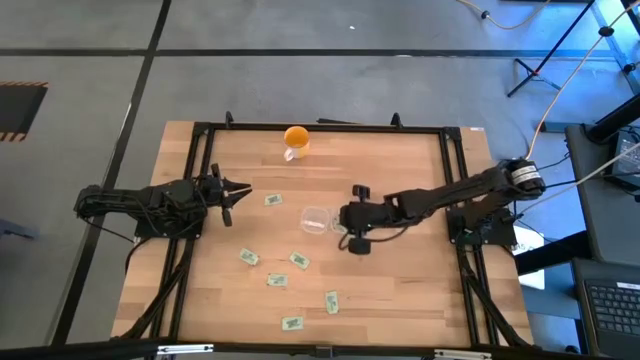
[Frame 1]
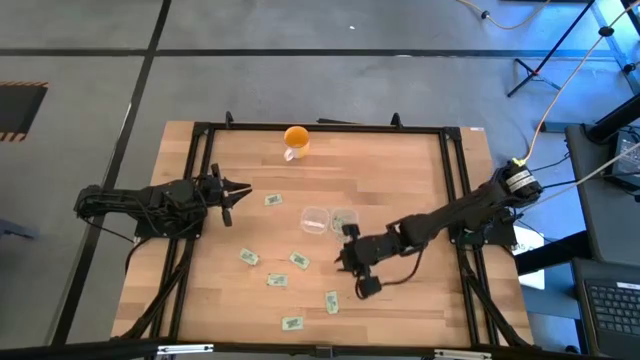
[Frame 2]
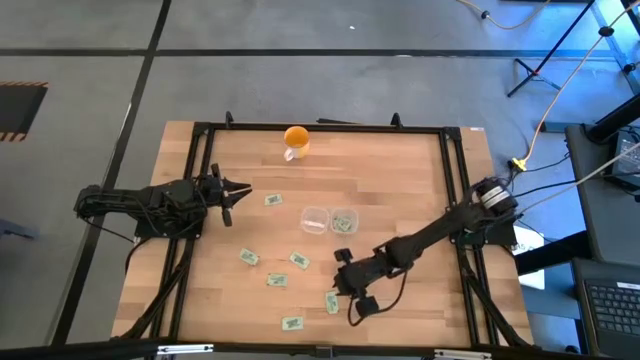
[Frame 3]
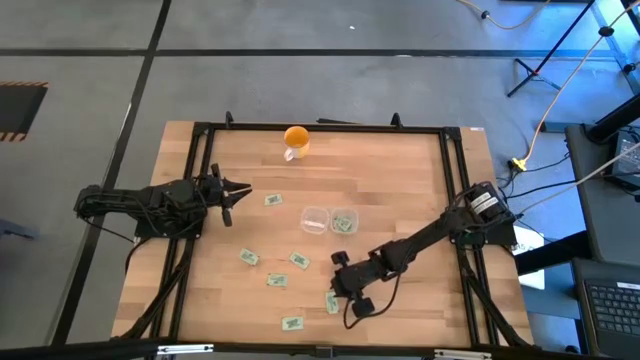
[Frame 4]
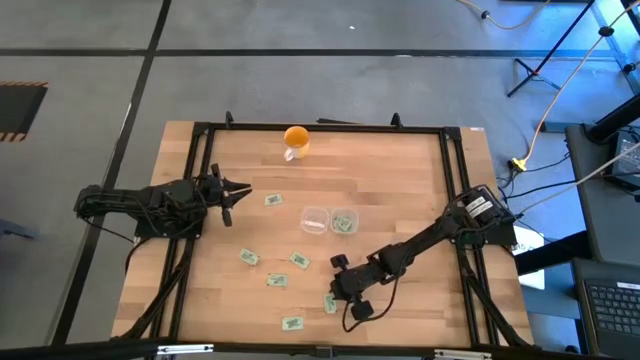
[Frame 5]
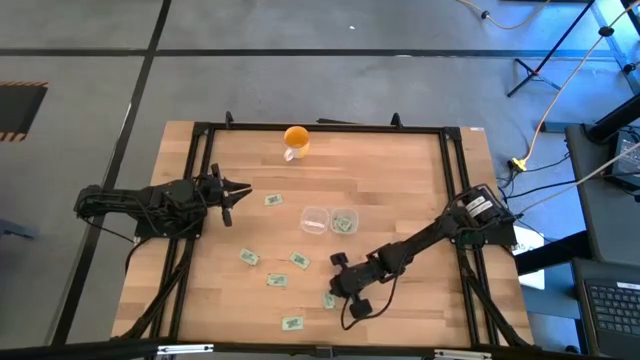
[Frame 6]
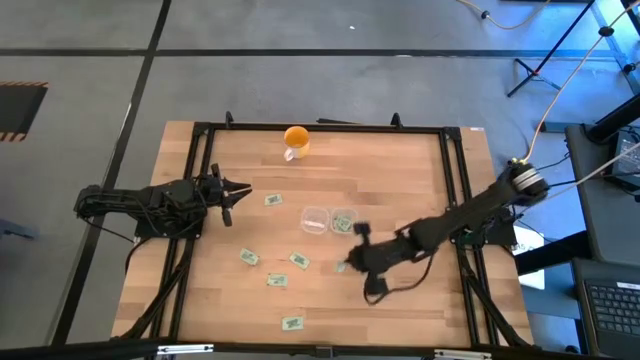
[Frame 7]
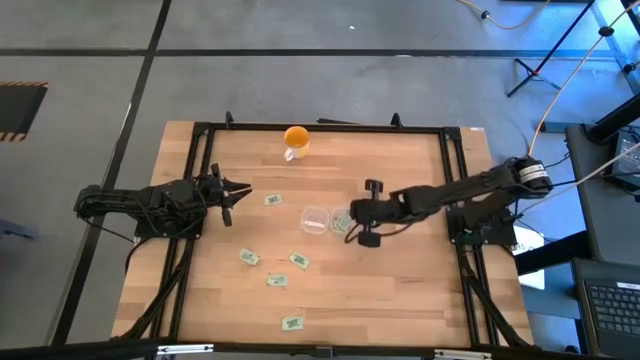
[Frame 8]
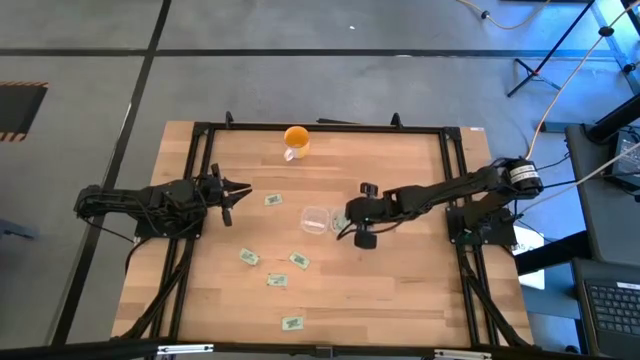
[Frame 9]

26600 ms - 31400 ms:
Task: Pick and place items into bin
Put the stevia packet into the right transparent bin

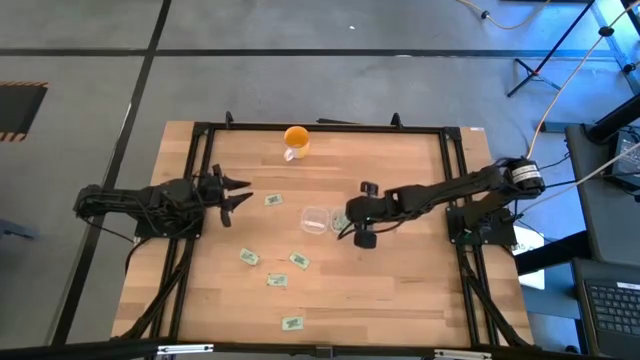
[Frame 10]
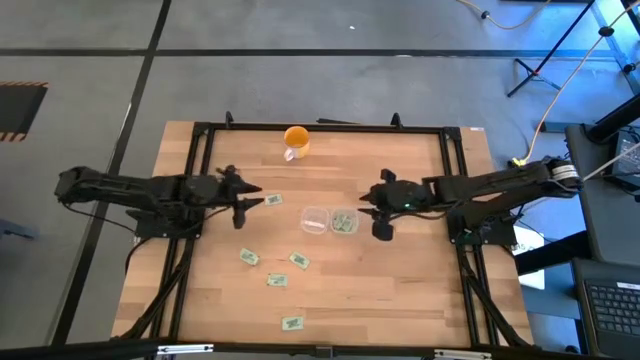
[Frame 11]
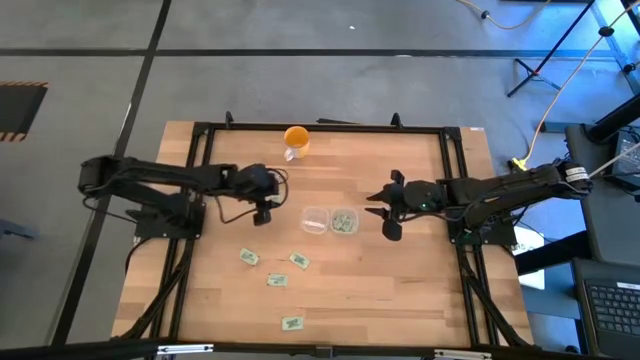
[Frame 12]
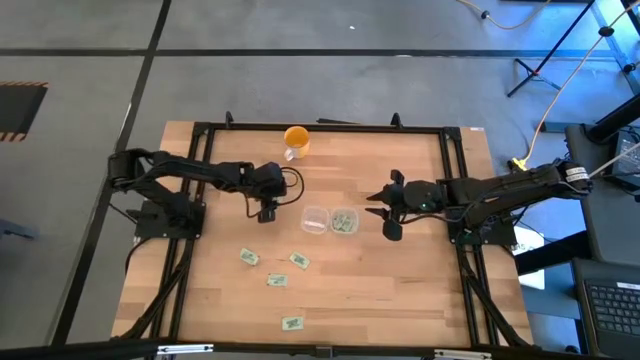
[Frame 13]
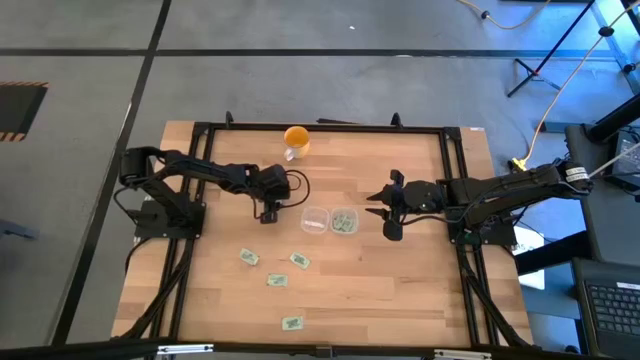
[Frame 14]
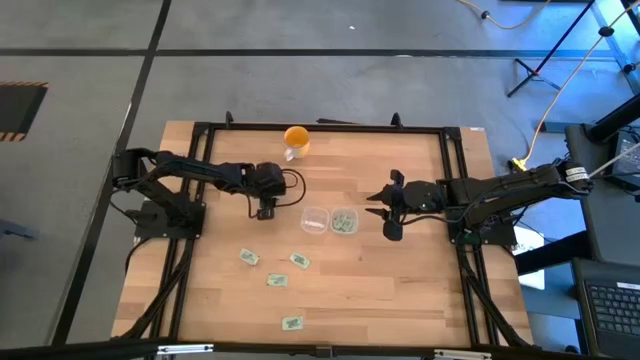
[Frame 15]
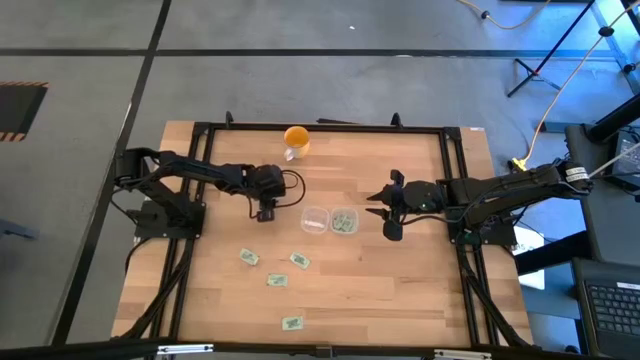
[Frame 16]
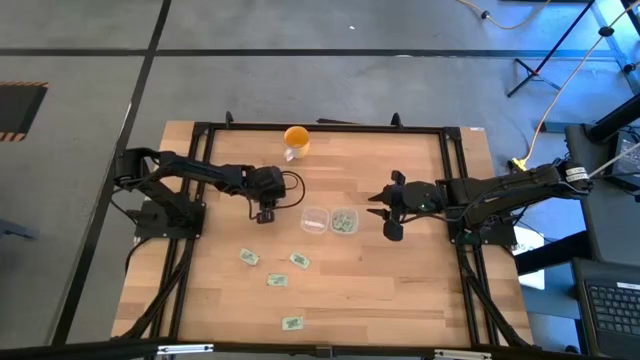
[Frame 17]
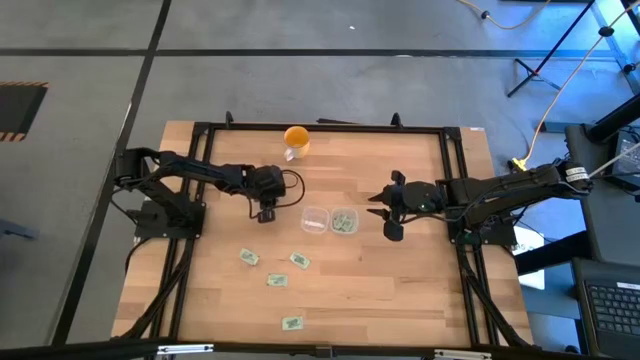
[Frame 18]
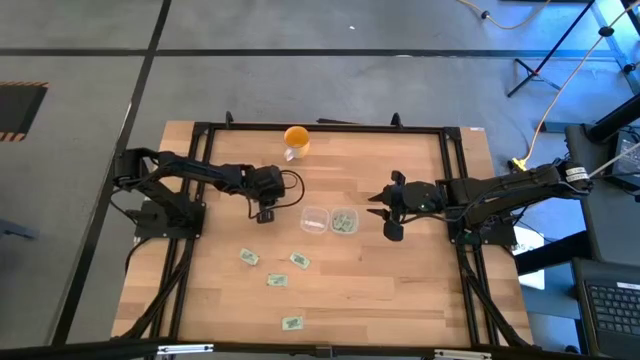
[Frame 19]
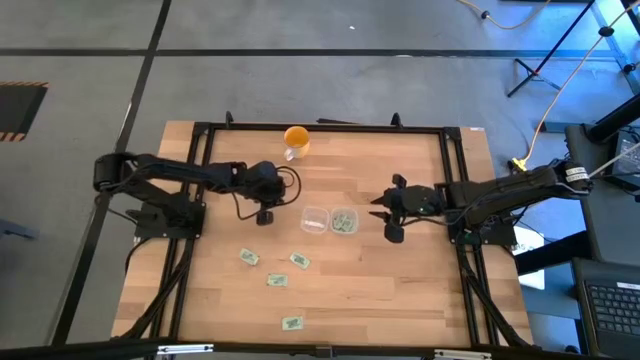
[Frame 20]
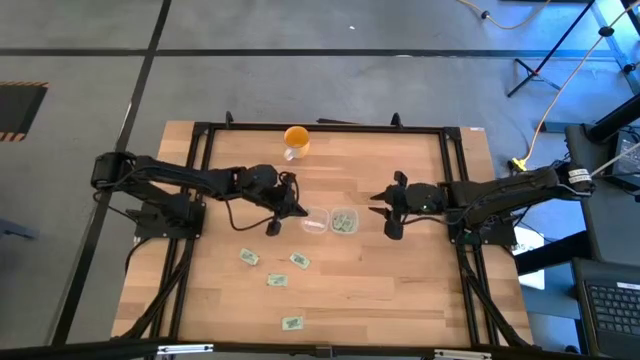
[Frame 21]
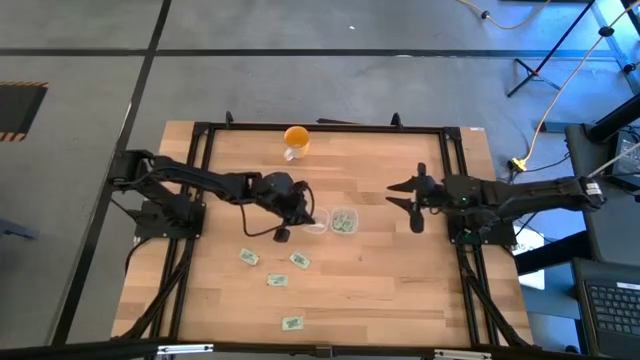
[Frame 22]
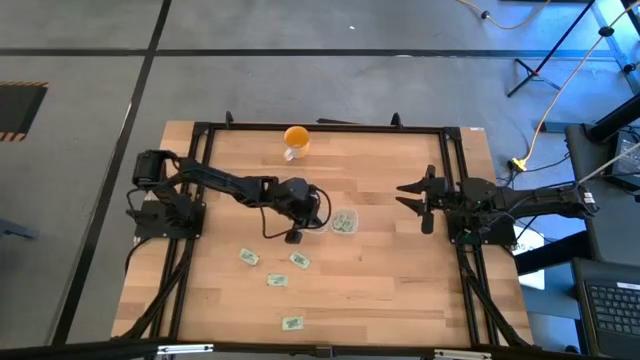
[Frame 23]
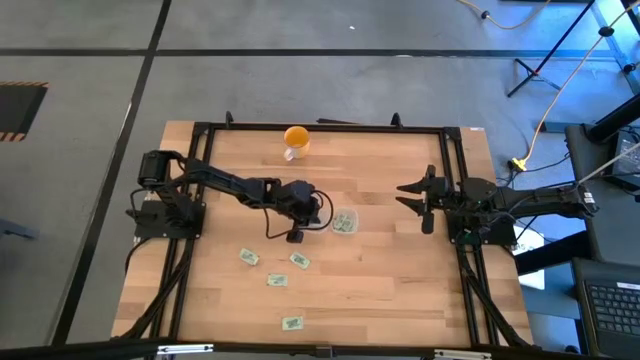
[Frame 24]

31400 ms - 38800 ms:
Put the stevia packet into the left transparent bin

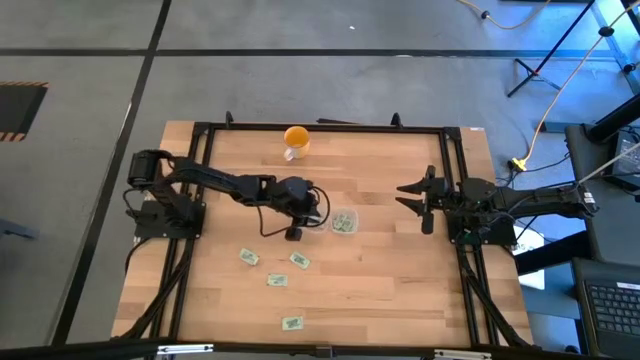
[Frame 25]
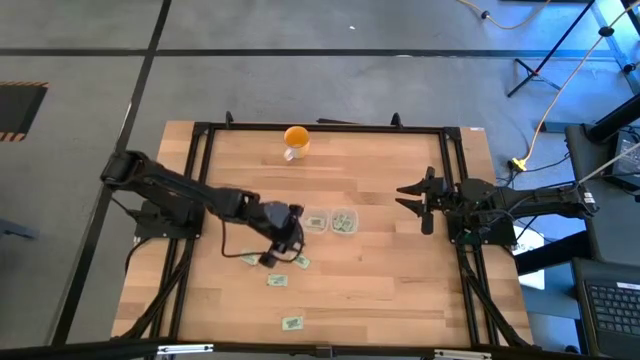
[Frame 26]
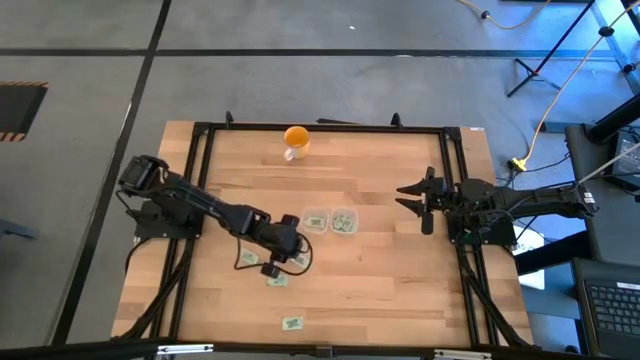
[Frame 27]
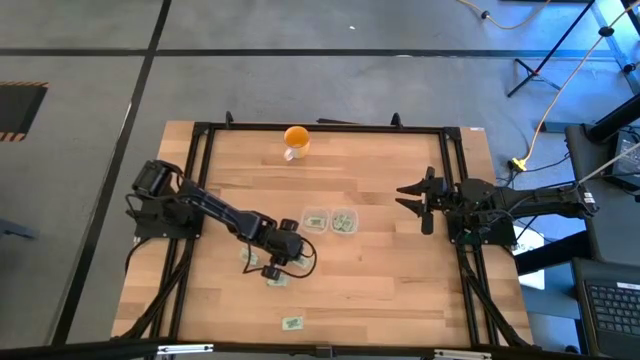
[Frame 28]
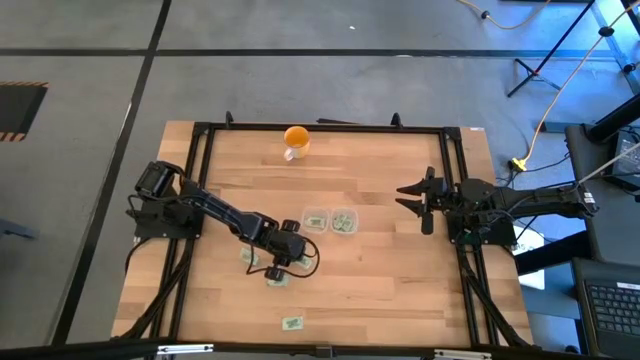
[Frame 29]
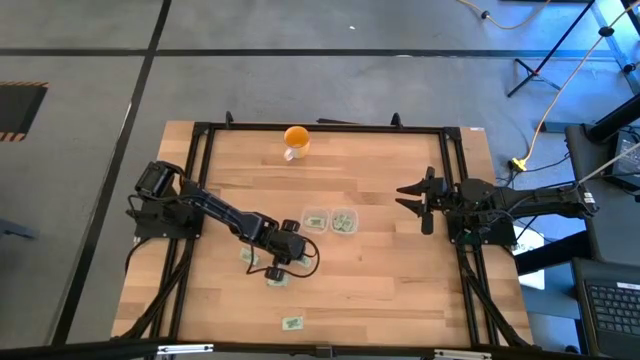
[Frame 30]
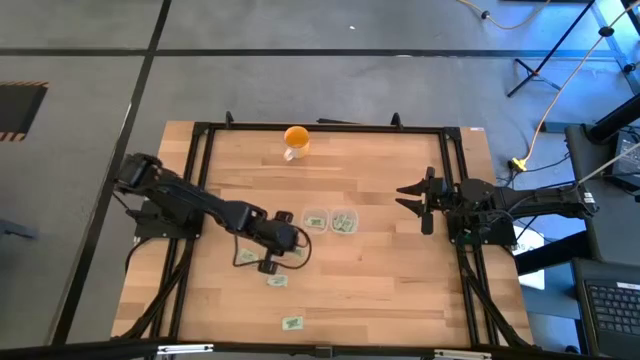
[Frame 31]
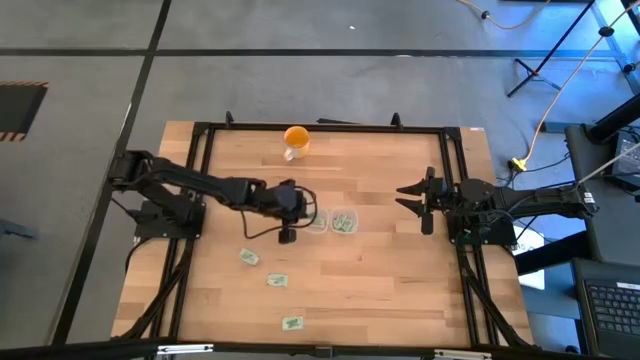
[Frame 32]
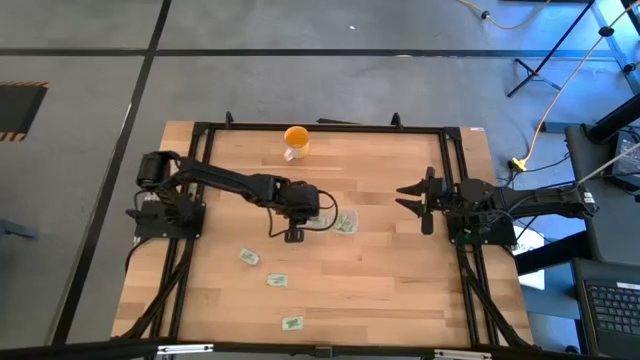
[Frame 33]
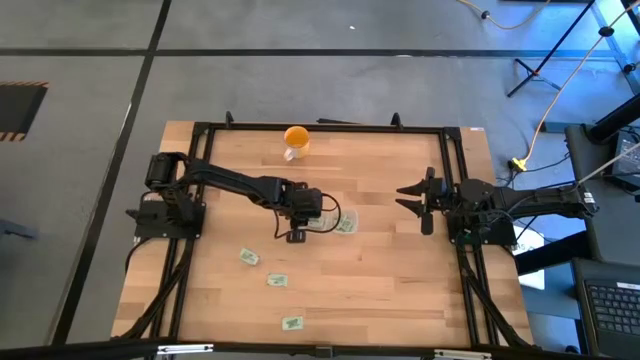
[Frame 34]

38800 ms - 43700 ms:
Put the stevia packet into the left transparent bin

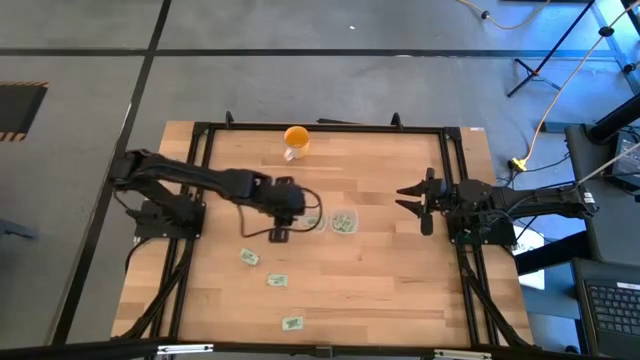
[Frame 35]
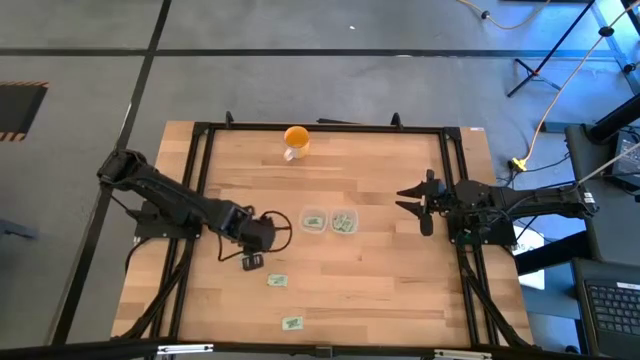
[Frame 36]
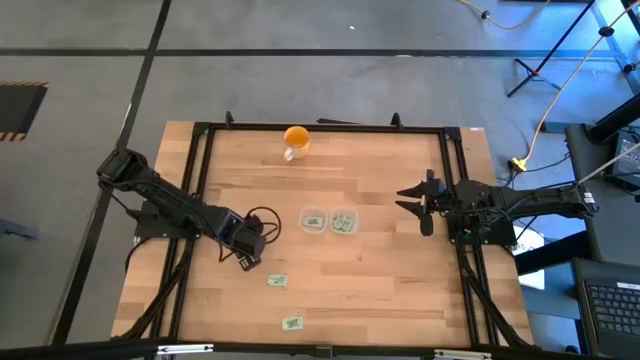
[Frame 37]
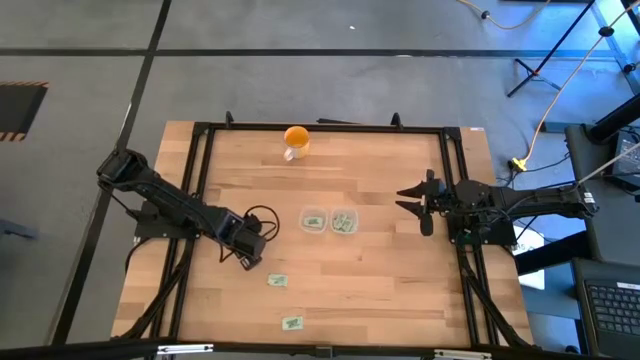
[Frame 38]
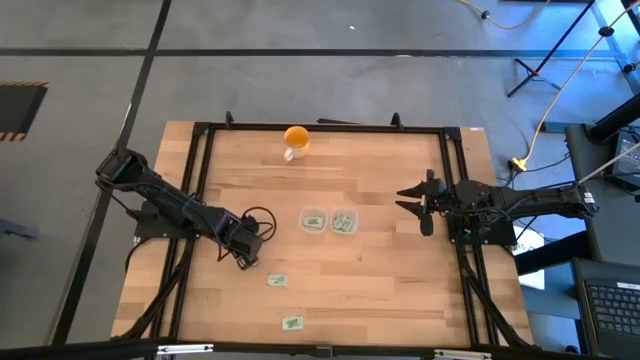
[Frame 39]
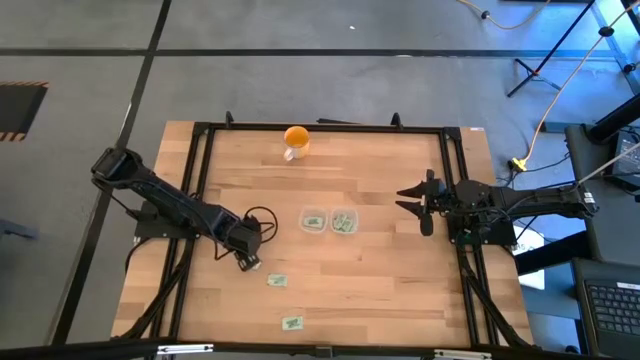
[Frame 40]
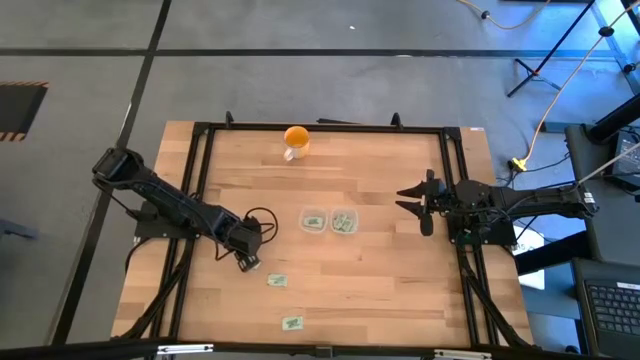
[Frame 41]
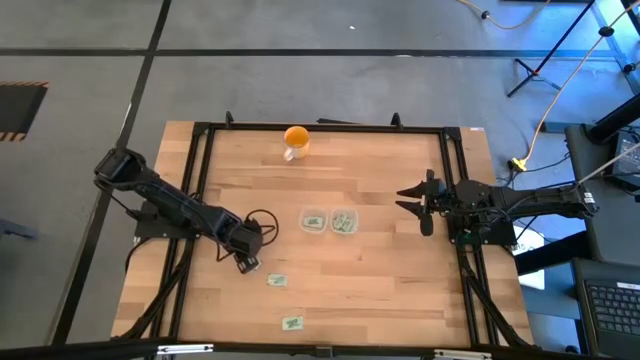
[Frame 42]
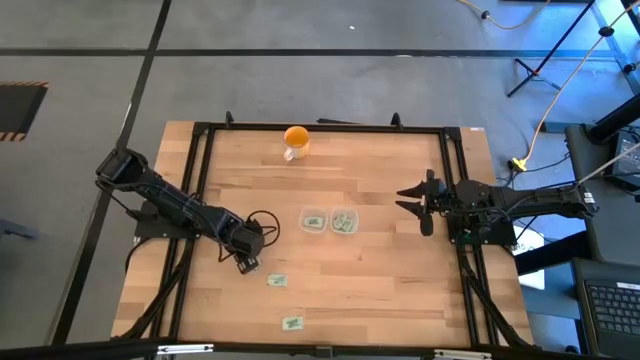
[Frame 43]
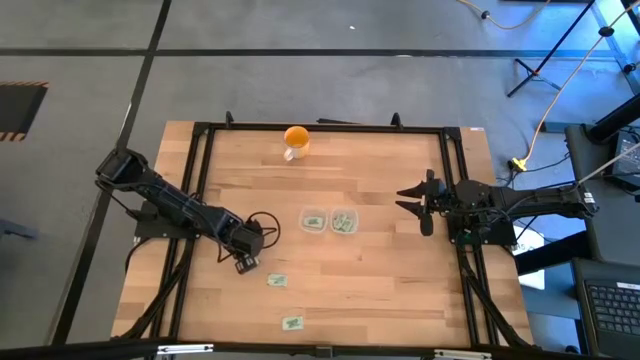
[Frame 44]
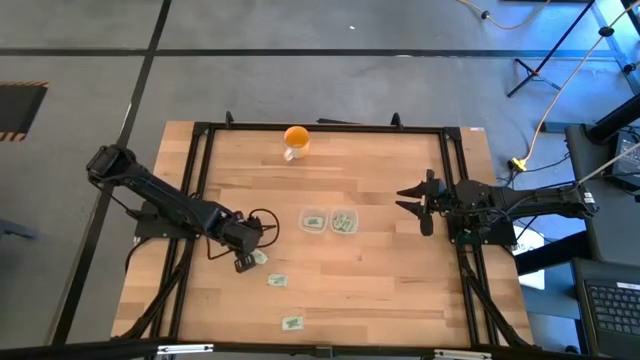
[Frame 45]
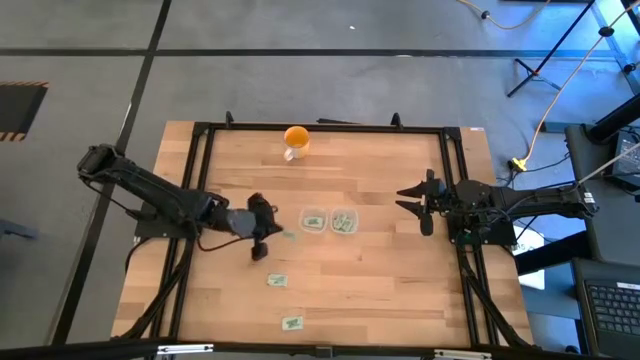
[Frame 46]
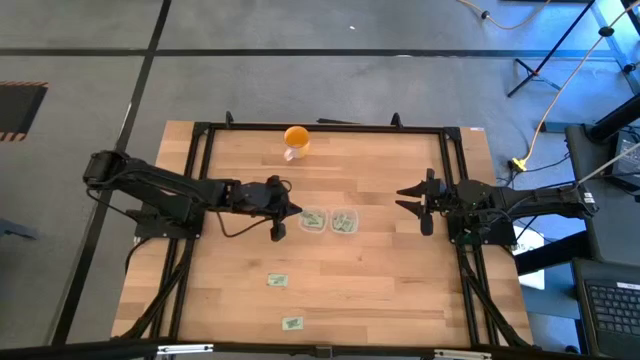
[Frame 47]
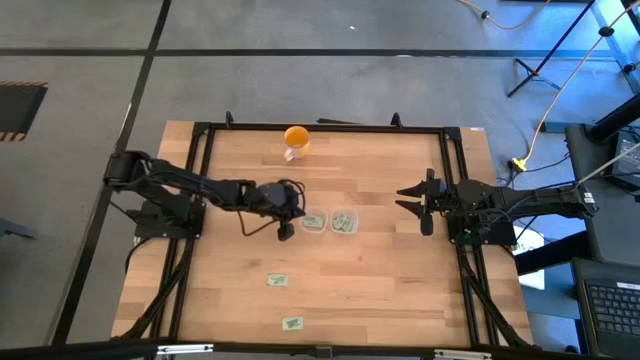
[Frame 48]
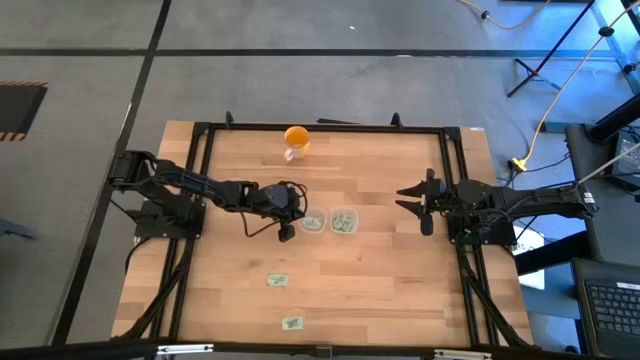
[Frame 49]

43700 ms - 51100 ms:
Put the stevia packet into the left transparent bin
